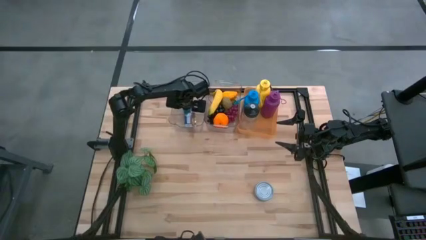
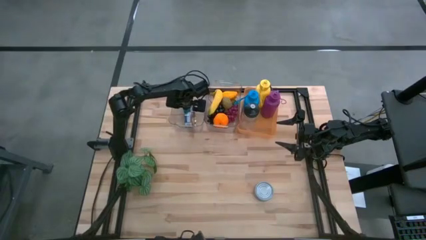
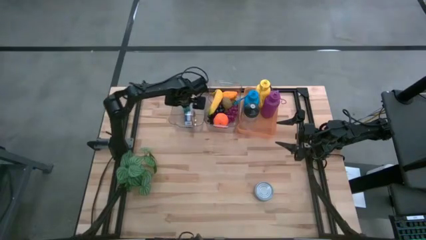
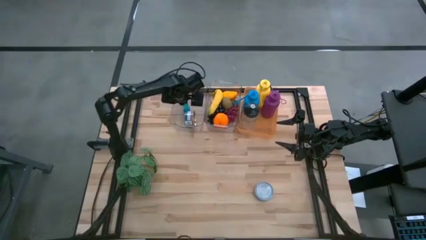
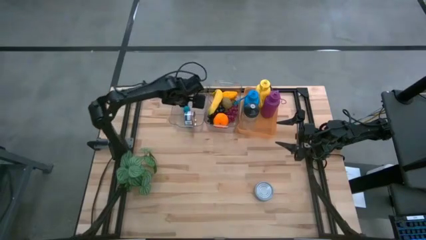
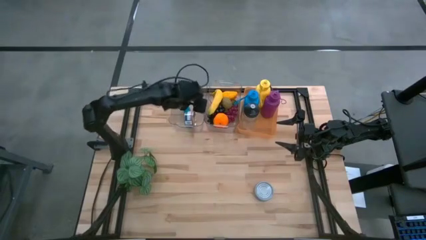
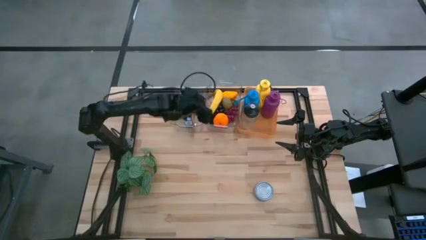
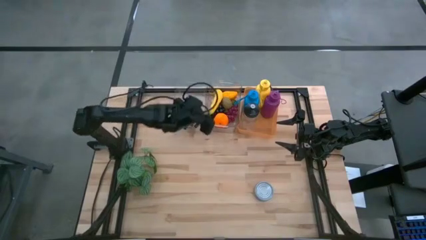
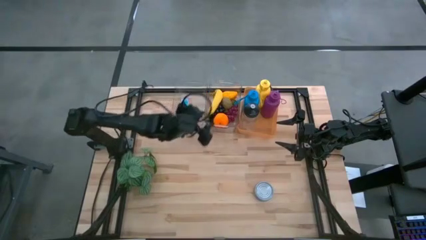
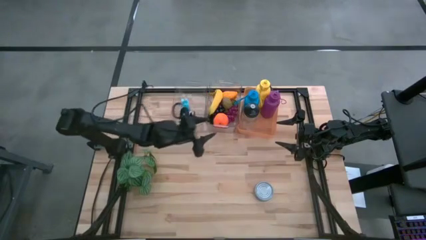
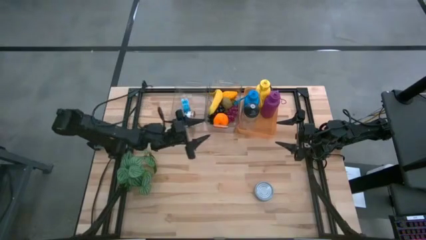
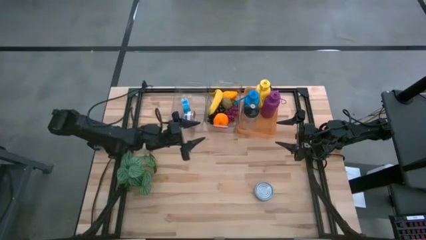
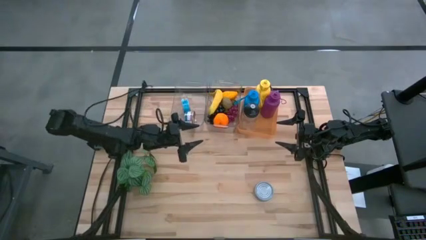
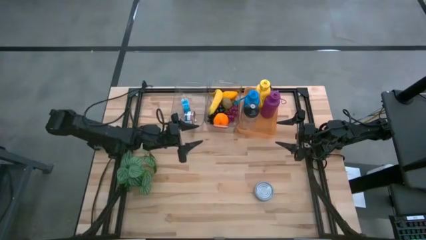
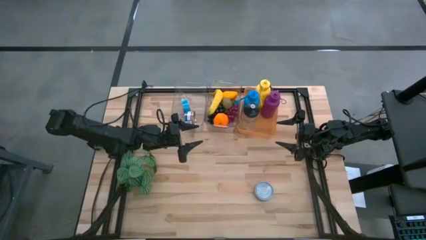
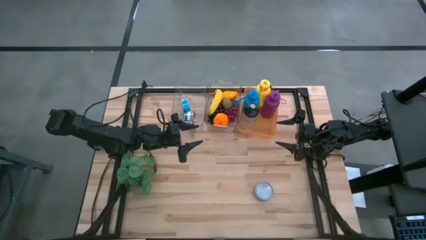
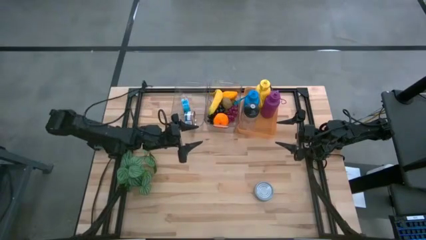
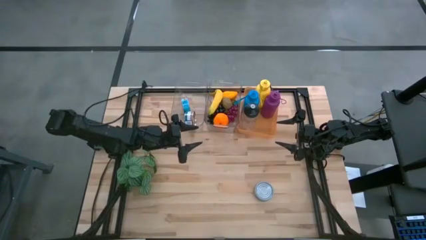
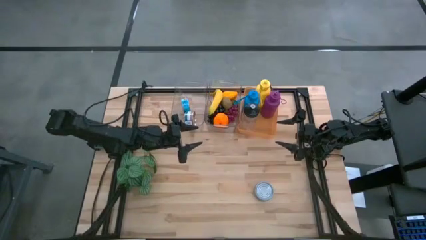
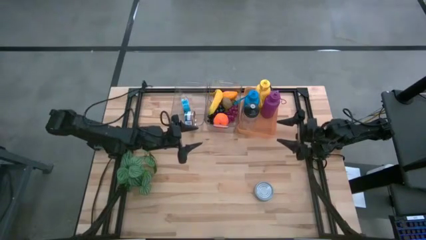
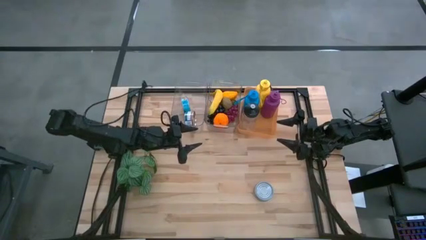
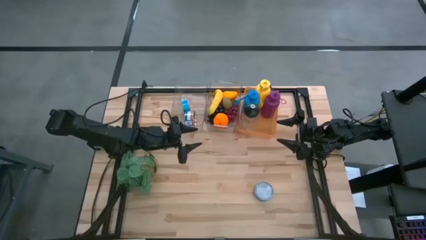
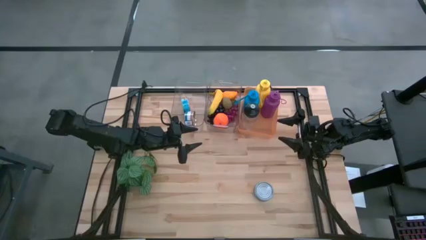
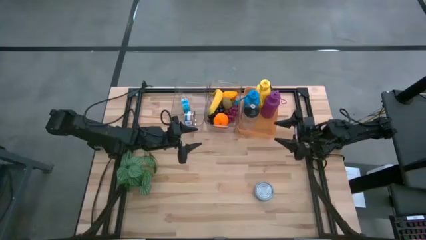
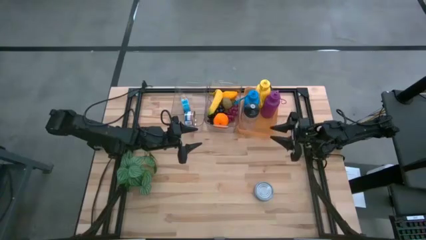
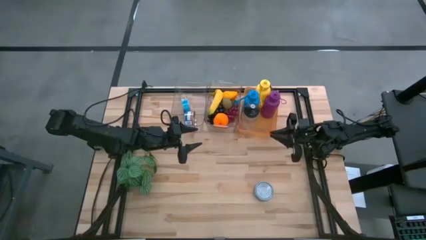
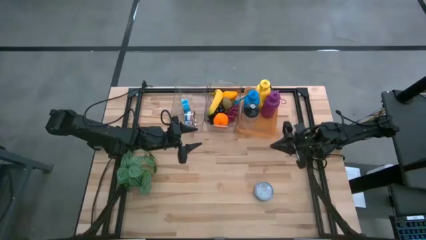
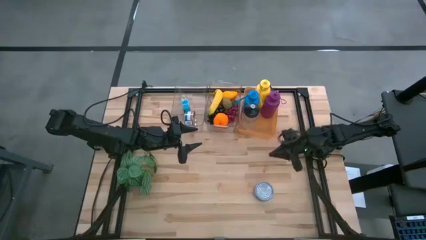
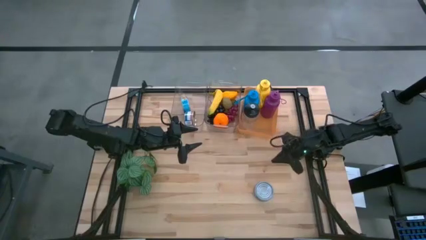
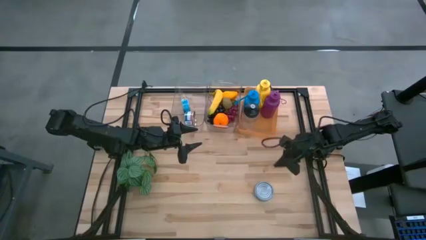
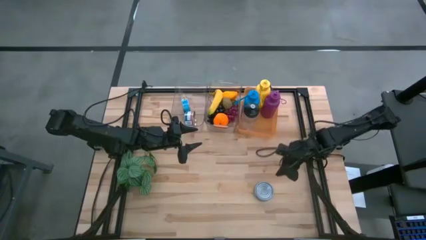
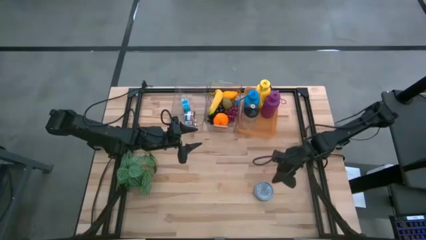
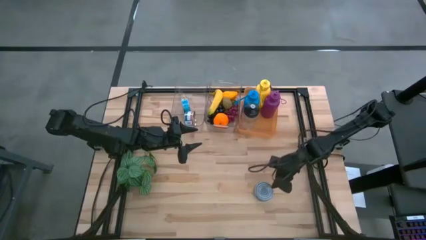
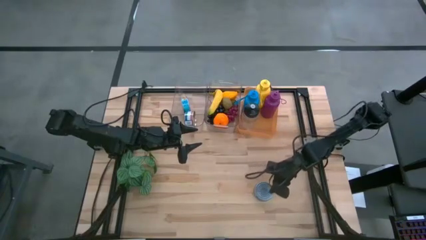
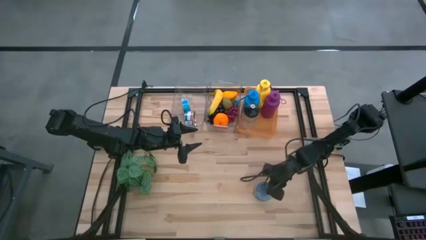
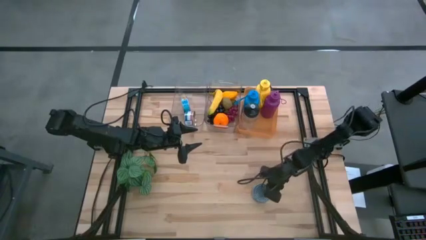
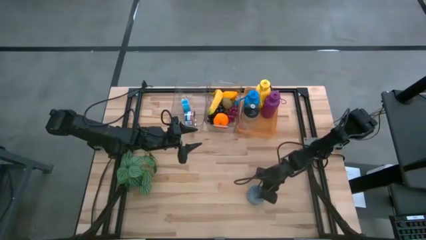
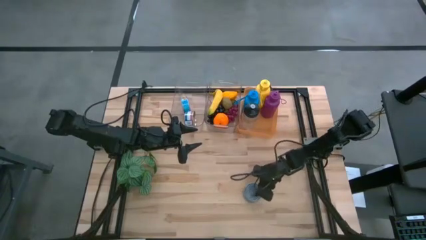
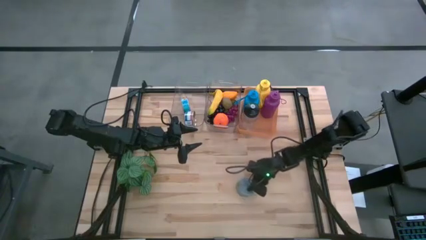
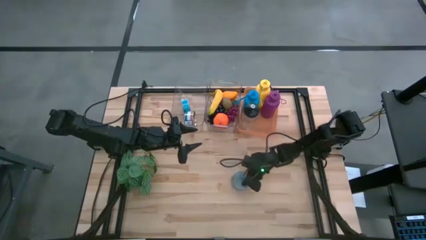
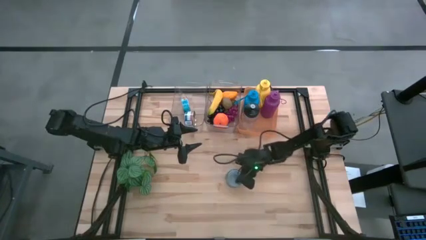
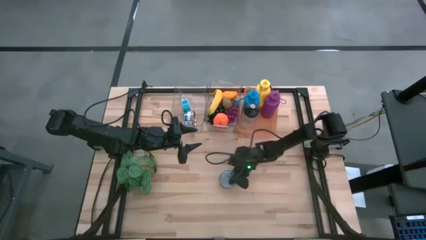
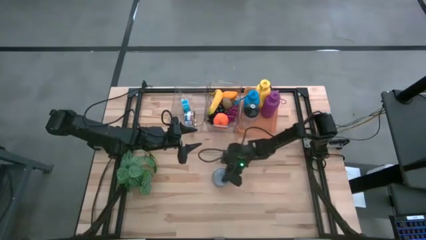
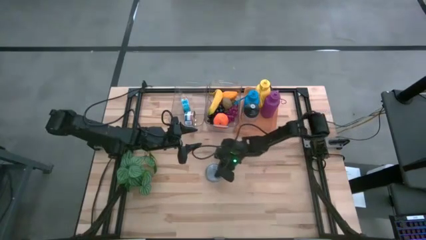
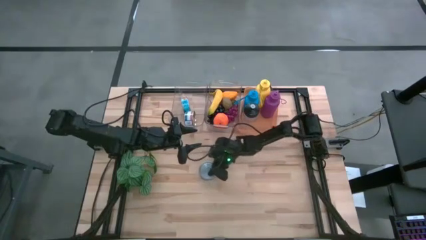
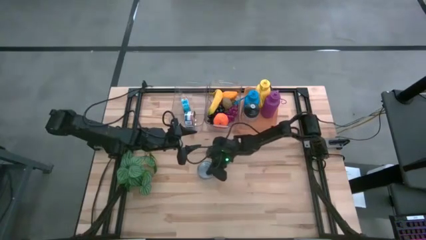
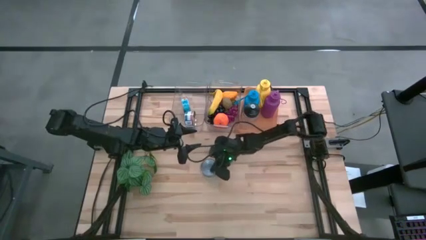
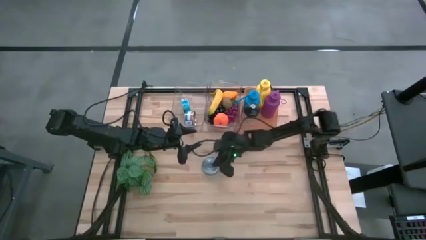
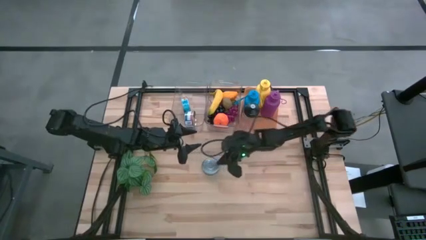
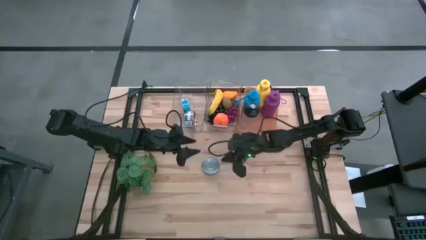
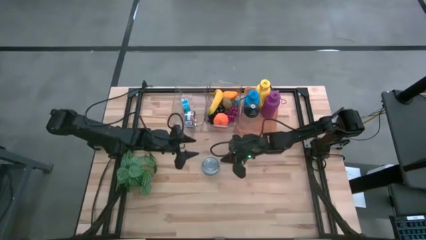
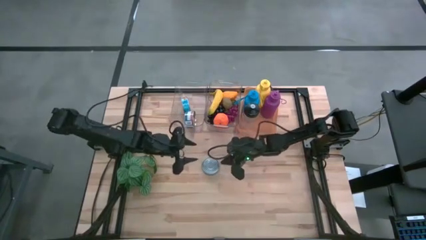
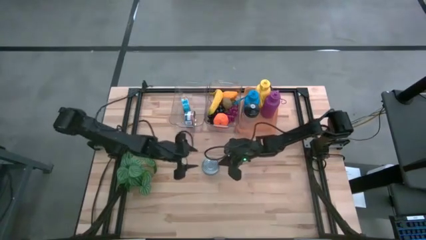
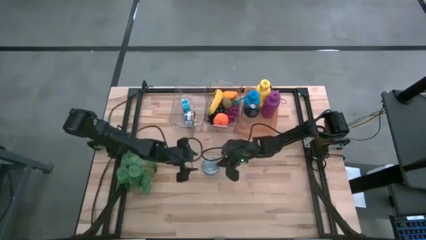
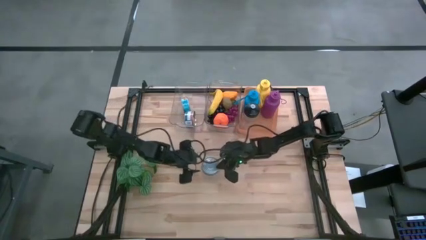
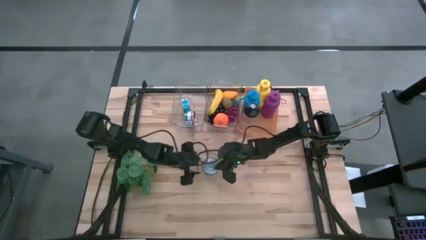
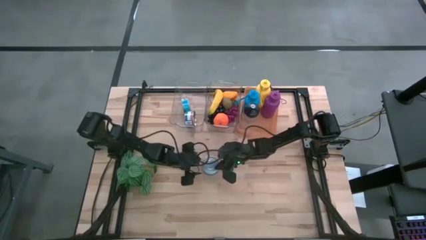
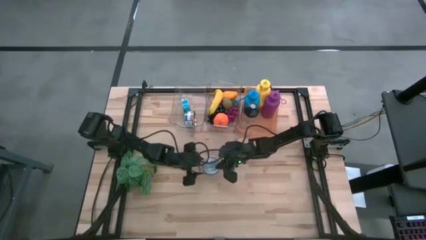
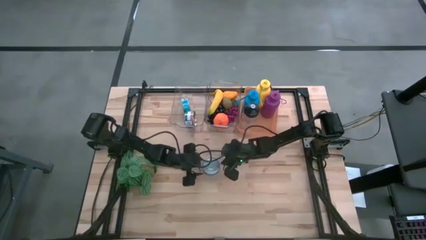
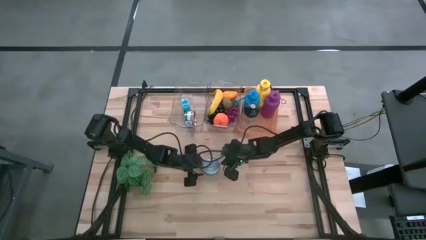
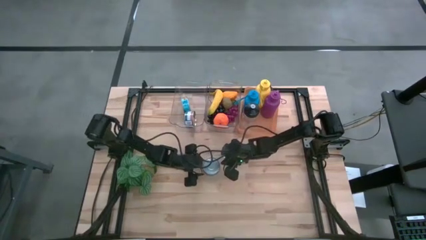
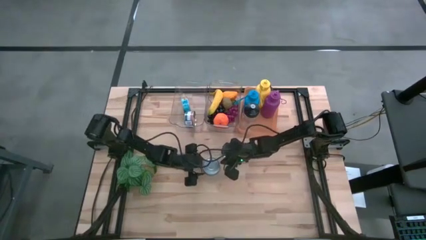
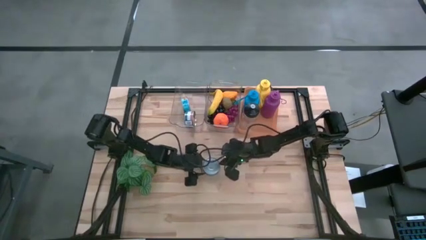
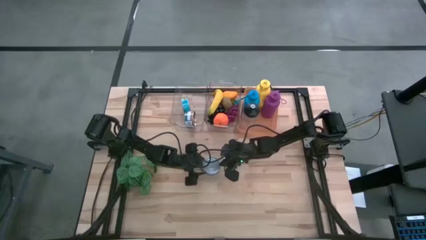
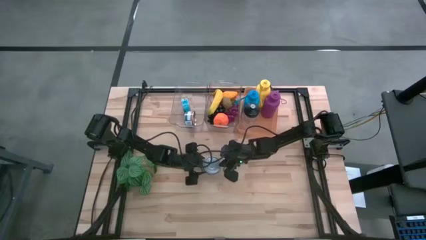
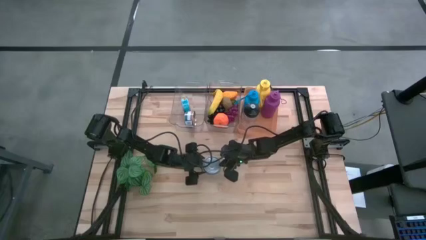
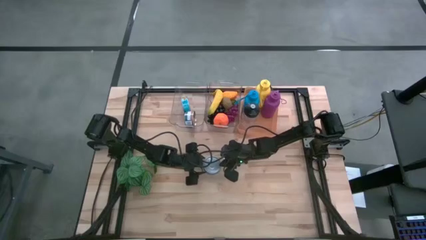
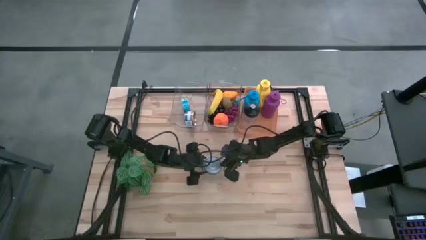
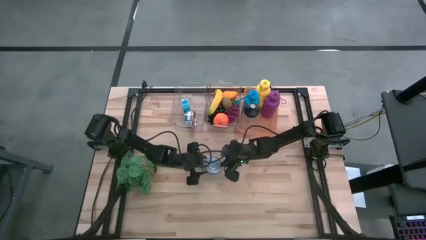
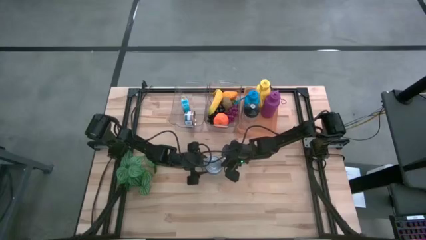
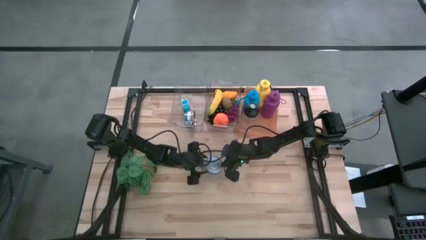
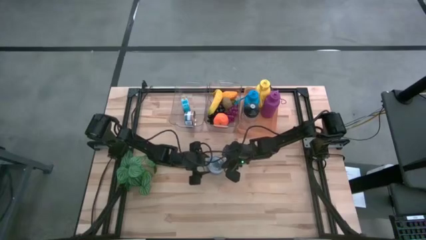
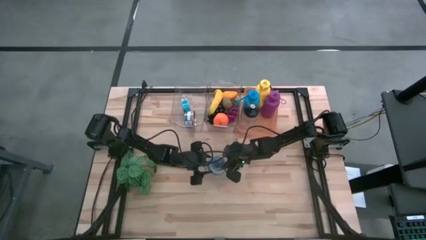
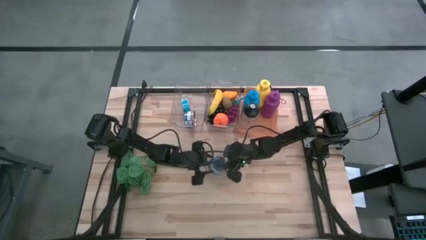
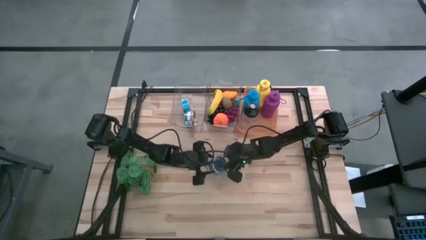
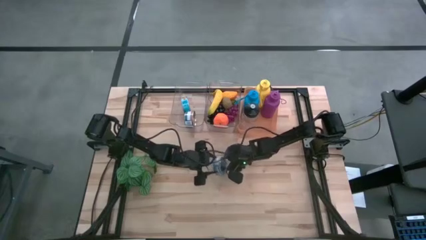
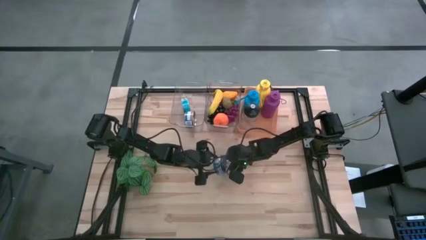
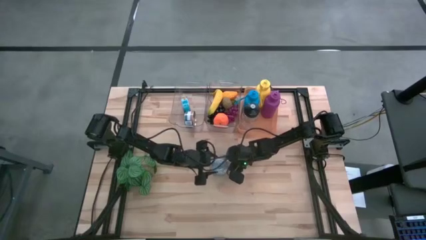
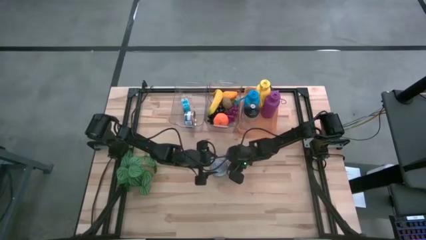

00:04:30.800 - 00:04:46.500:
Task: Pick & Place Food Item
Put the blue tuna can into the left transparent bin
